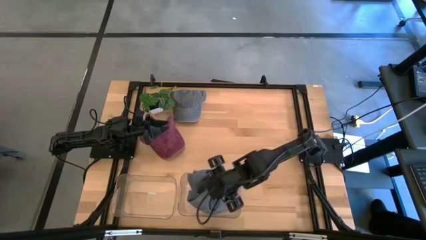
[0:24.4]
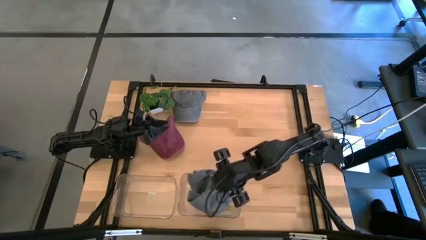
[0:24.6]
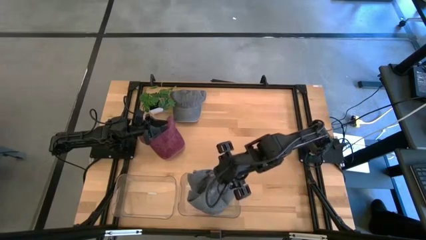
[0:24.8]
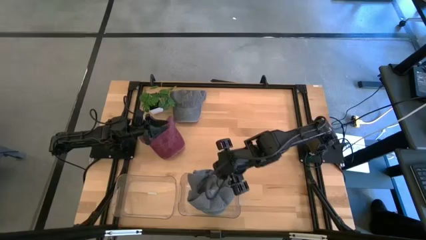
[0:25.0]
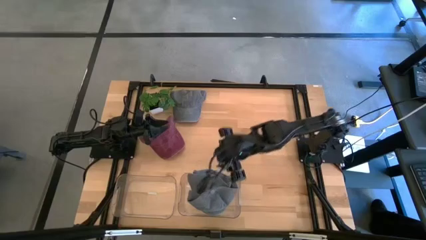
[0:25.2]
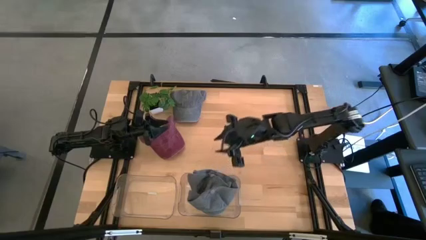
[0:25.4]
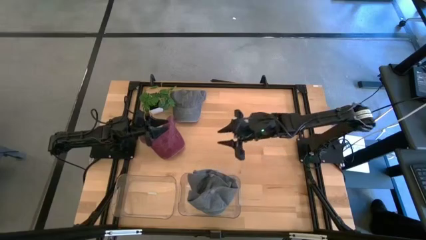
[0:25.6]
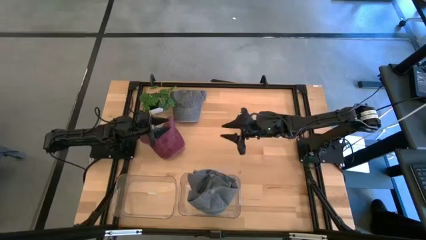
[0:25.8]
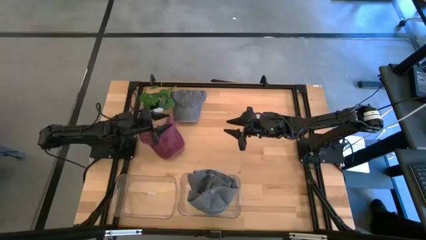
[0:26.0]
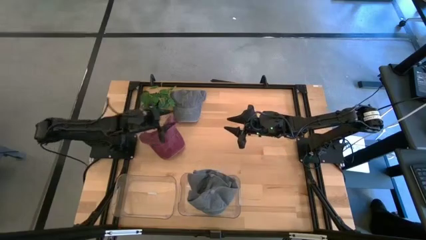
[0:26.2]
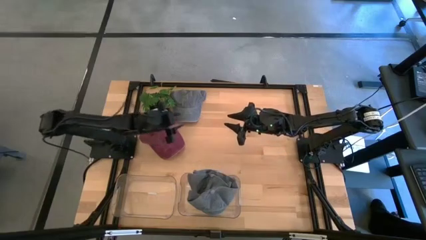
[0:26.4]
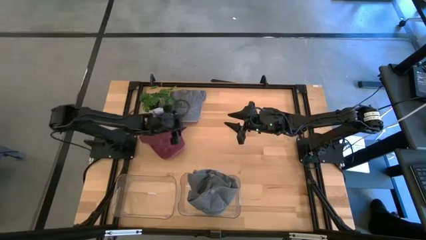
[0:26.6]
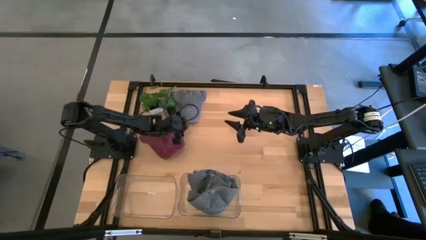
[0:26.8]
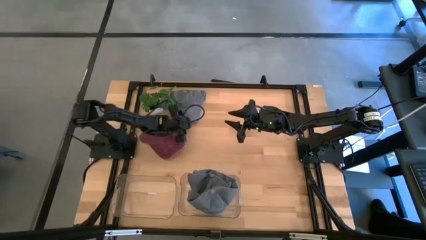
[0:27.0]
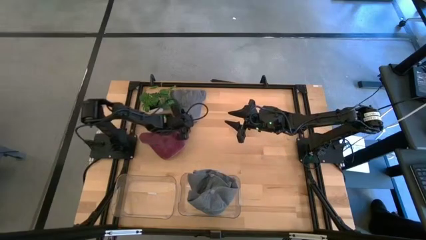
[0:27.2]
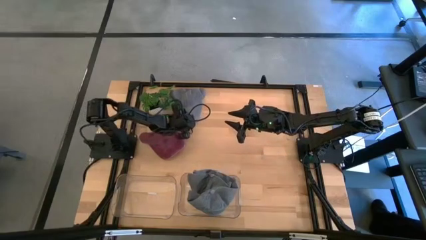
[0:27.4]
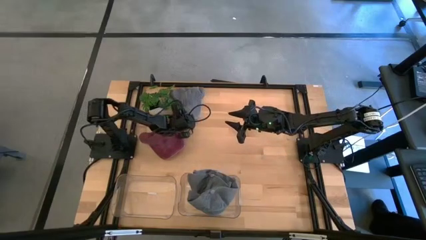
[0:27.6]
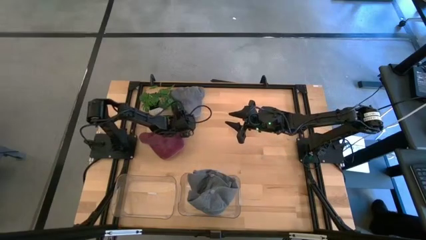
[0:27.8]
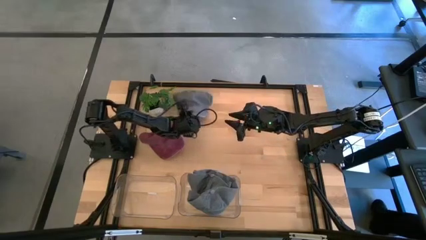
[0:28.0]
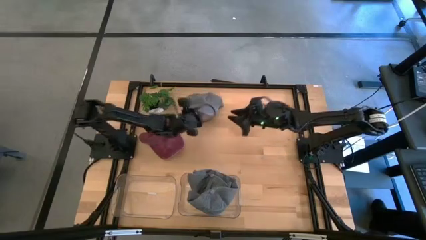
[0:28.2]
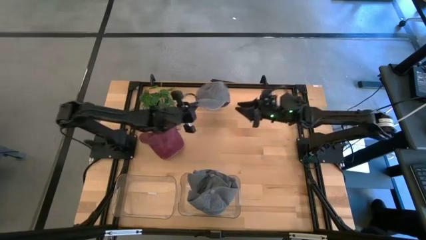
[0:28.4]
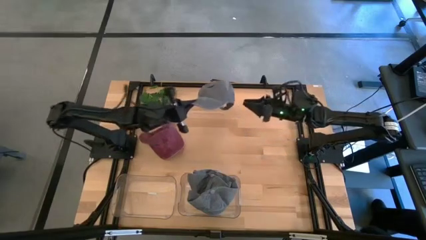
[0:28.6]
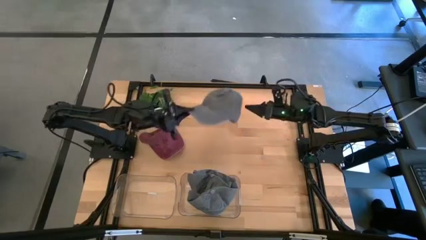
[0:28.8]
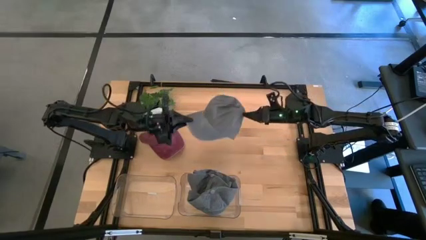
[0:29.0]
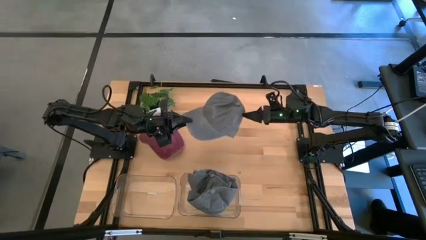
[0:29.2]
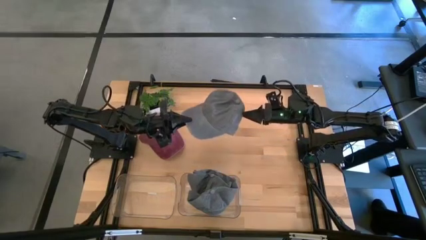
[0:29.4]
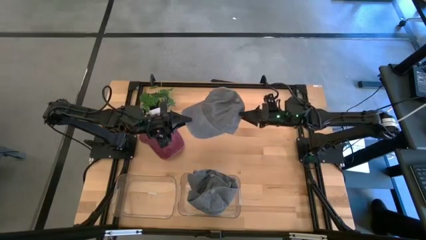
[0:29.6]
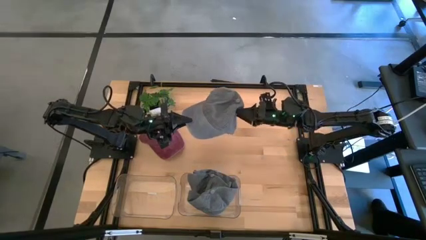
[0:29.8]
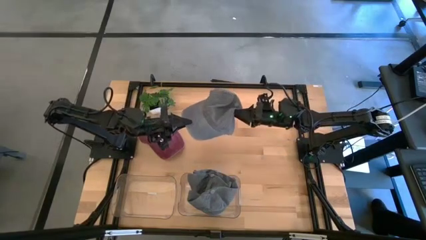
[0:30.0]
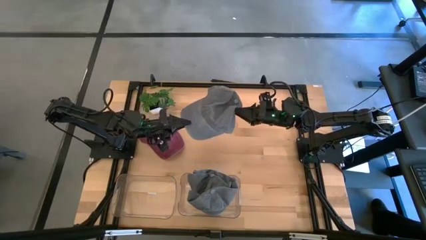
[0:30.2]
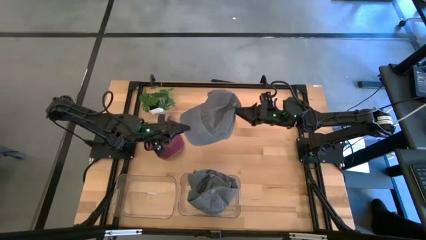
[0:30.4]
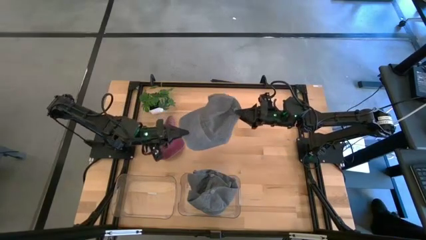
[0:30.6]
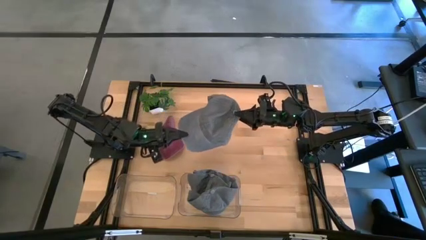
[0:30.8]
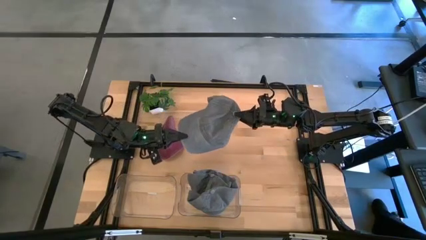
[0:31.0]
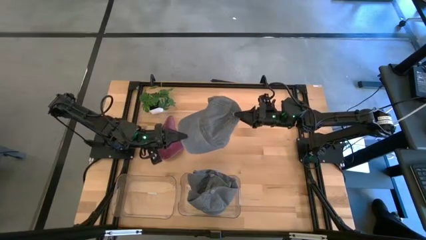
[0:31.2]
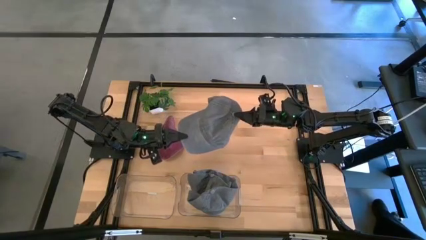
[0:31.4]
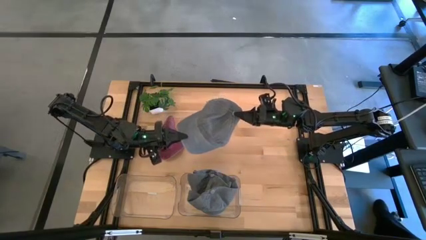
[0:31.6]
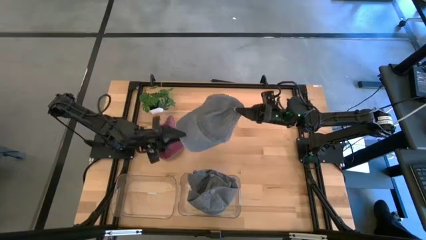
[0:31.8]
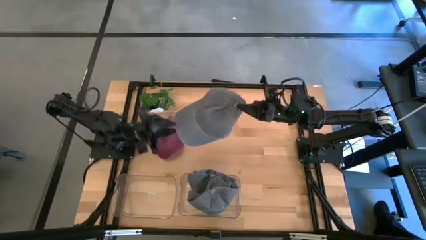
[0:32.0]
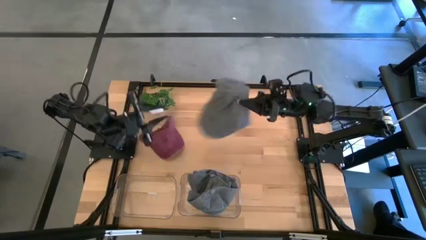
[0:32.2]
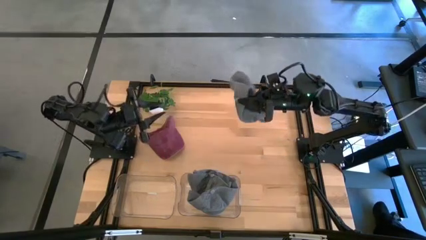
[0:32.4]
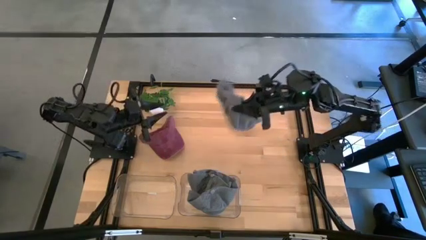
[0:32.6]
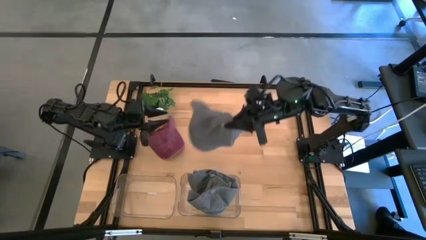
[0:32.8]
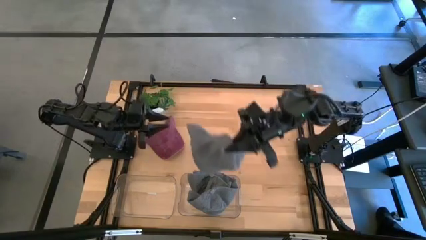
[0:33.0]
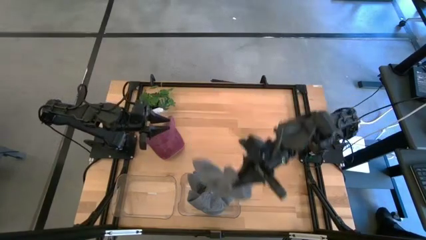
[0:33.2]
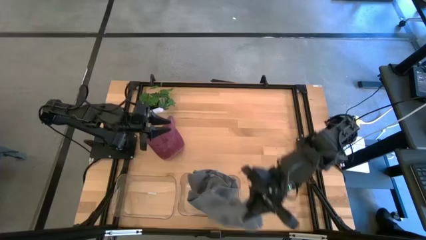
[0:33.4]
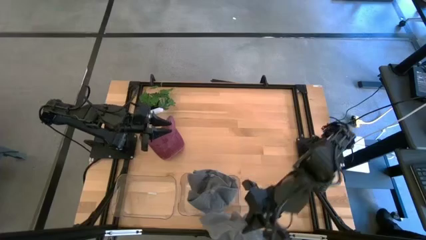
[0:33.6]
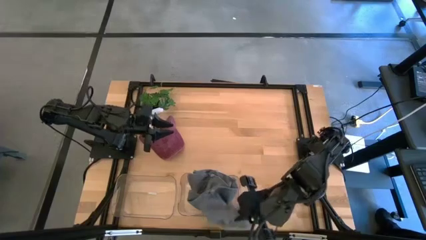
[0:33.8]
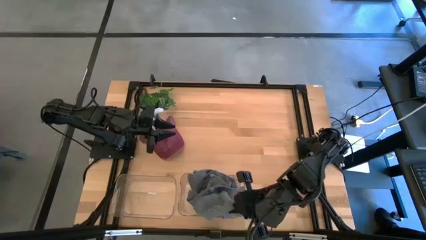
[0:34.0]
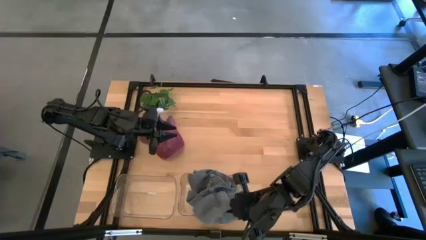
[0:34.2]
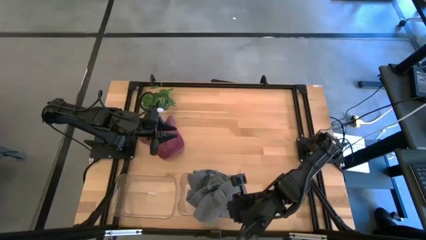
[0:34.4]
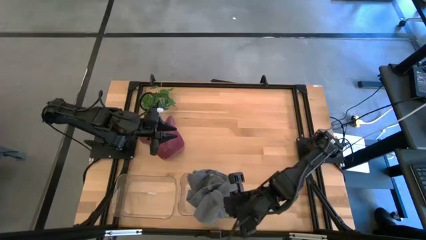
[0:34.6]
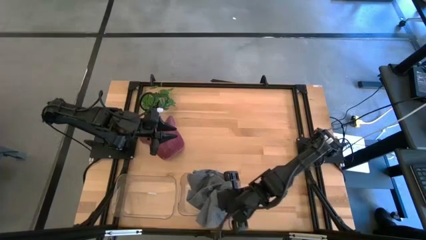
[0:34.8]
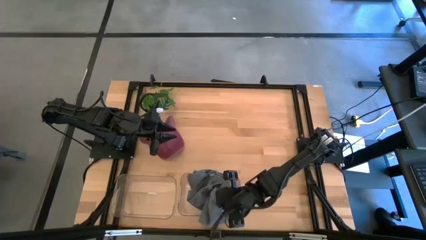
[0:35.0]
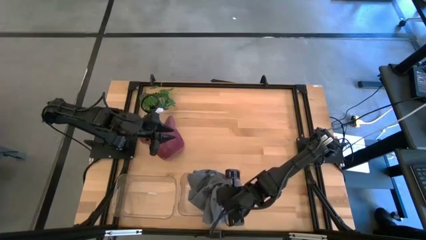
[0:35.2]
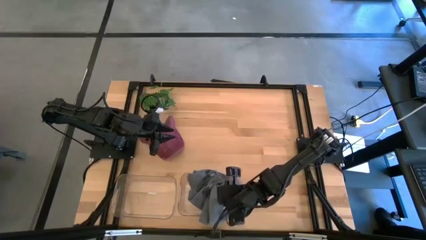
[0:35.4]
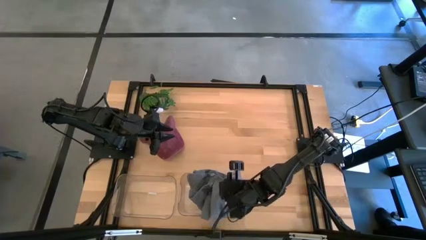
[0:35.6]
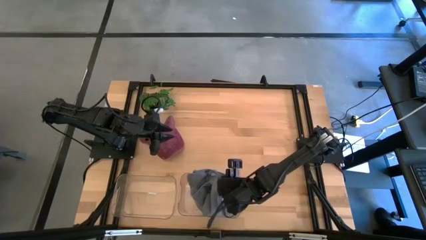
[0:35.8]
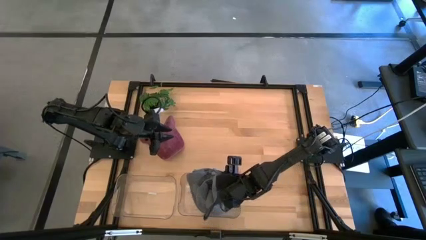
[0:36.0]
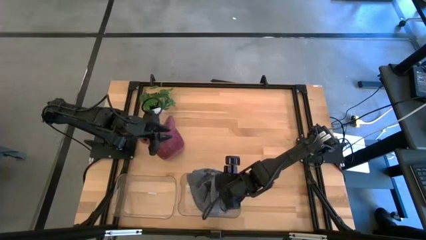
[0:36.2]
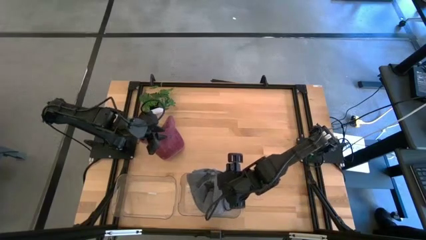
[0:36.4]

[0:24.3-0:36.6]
Task: Pick & Place hat
Put the grey cap into the right transparent bin

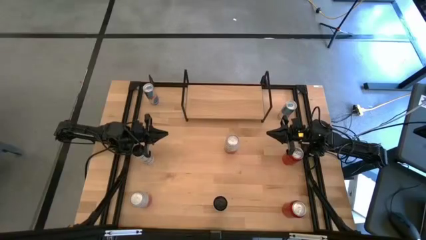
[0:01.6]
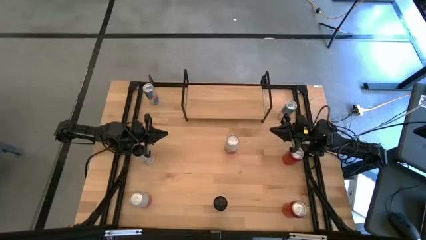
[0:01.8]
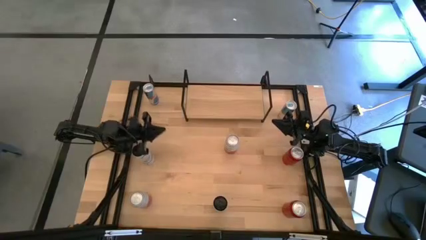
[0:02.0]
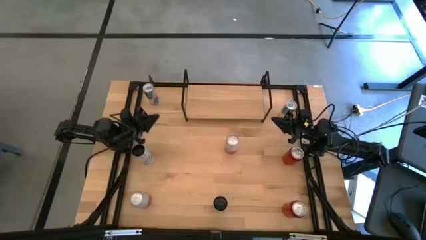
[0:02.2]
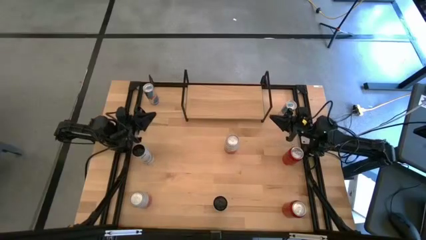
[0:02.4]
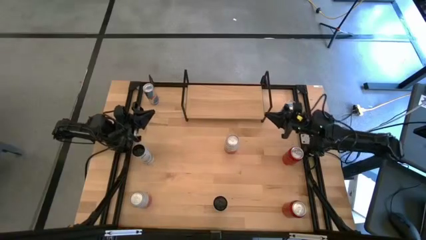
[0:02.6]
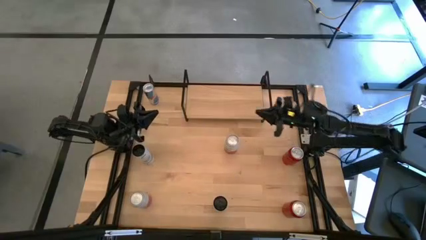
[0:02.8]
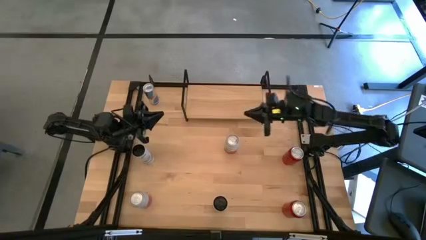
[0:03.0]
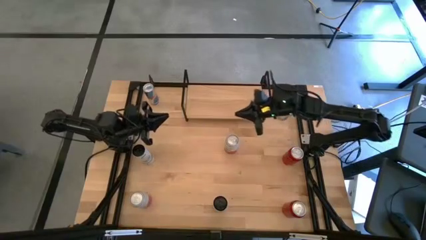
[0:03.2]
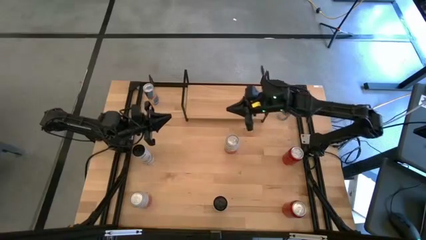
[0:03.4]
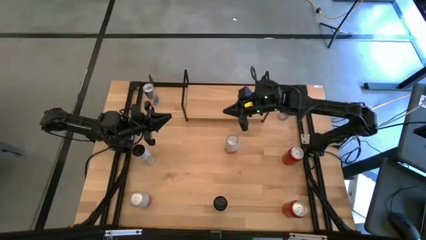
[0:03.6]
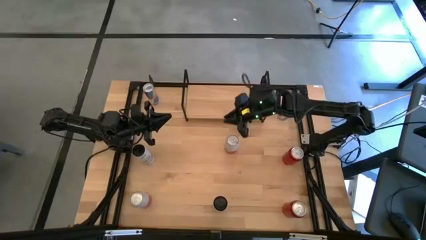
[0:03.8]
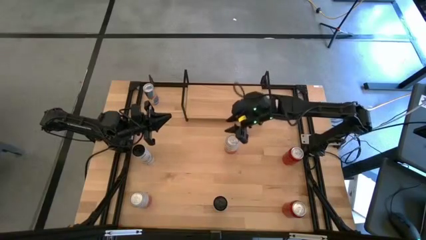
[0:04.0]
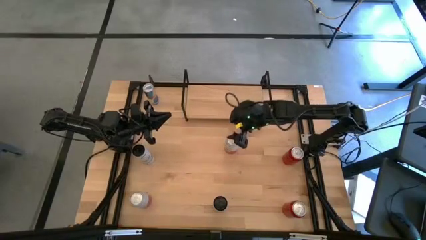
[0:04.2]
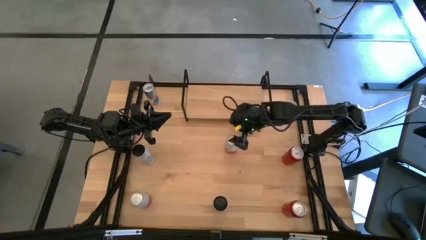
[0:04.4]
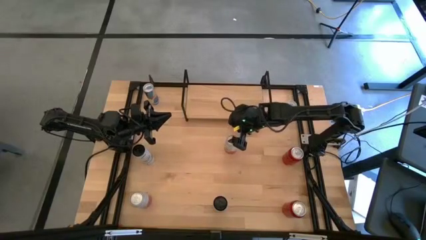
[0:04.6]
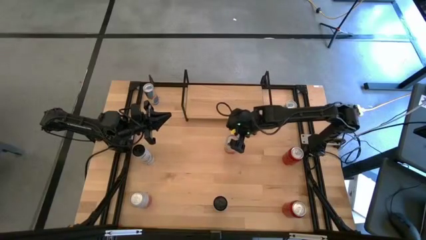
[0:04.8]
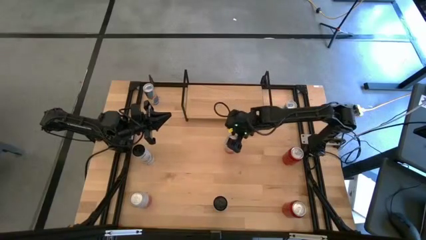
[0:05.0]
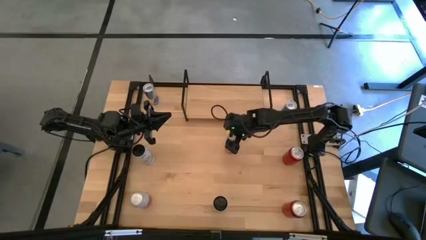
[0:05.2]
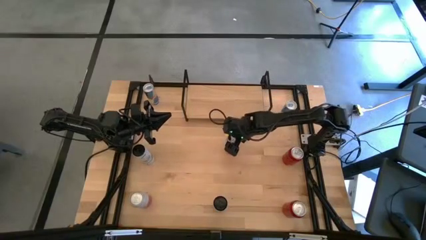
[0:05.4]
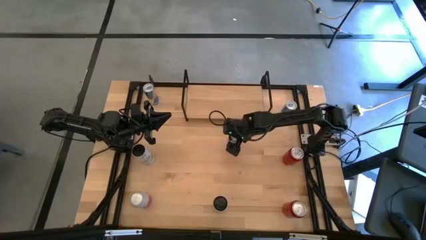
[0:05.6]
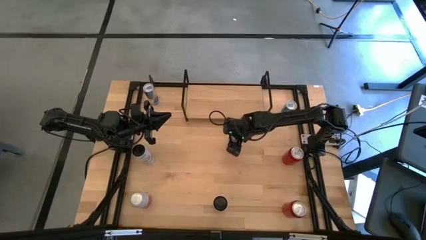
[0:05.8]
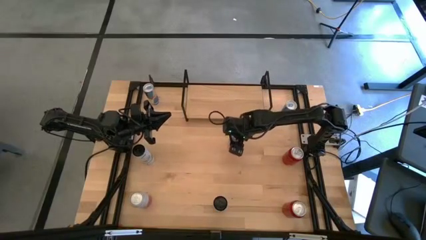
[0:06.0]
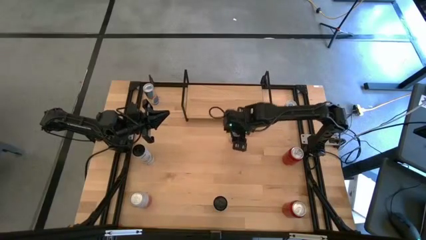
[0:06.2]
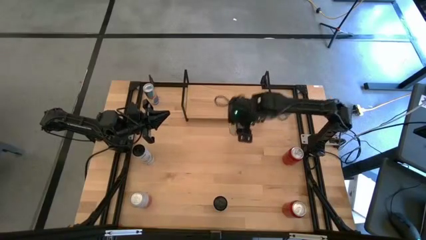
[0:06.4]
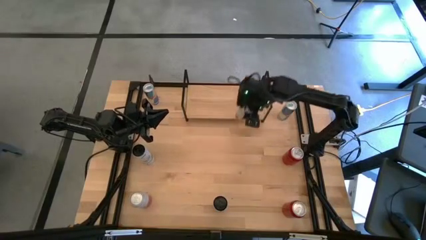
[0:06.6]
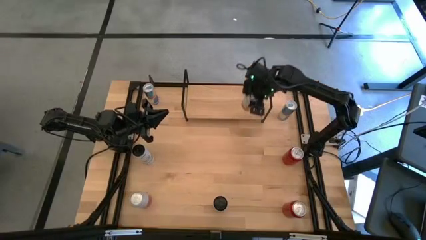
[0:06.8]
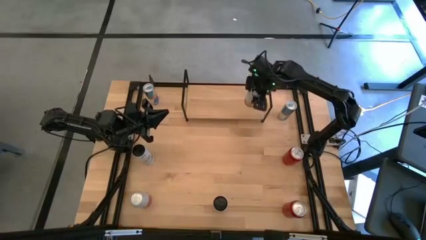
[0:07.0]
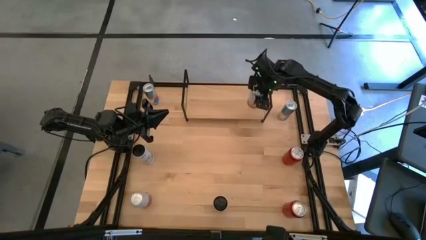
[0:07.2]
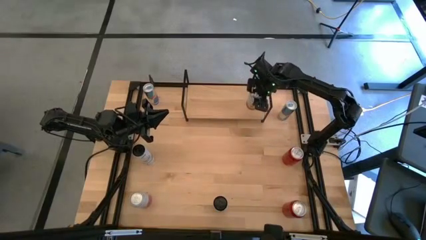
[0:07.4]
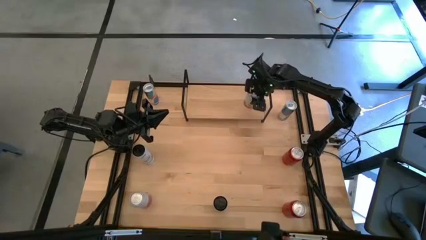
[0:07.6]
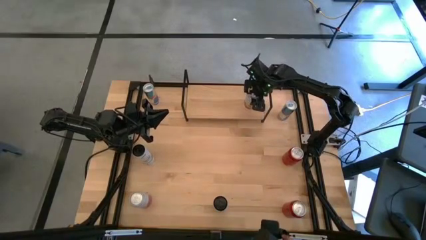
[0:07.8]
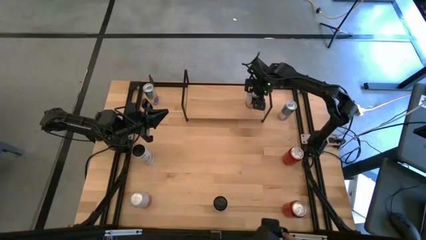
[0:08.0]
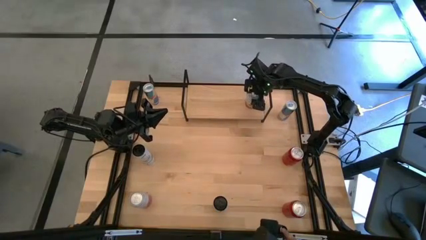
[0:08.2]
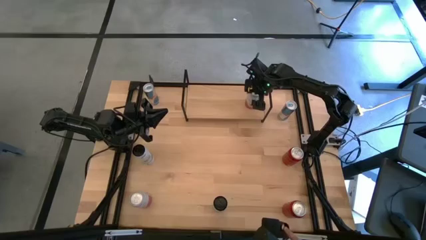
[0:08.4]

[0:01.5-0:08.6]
Task: Place canned beverage on shelf
Put the top pink soda can on the shelf
